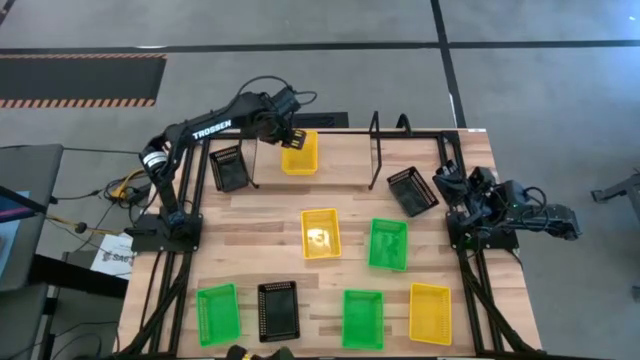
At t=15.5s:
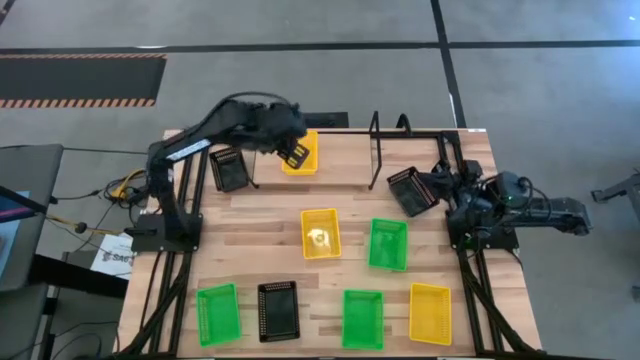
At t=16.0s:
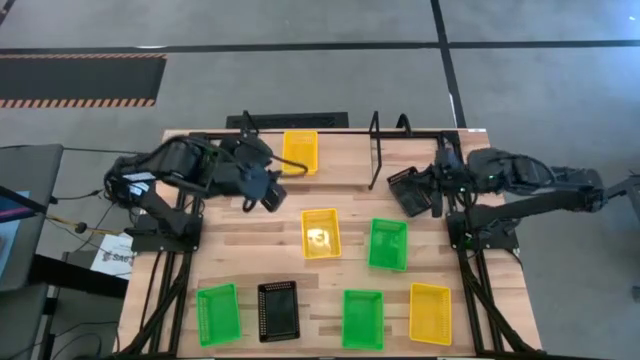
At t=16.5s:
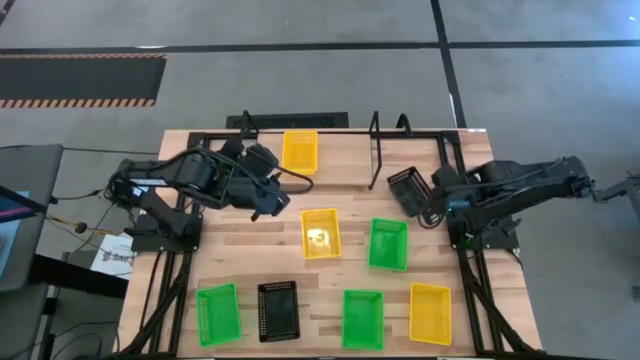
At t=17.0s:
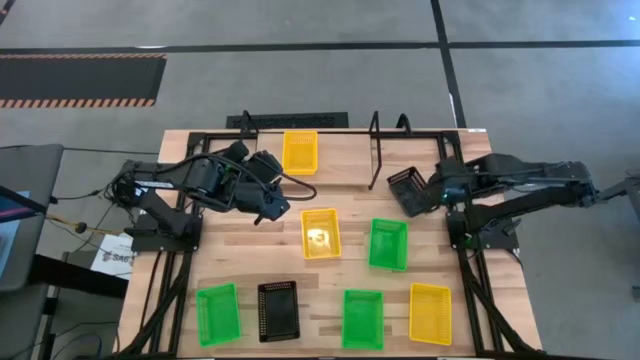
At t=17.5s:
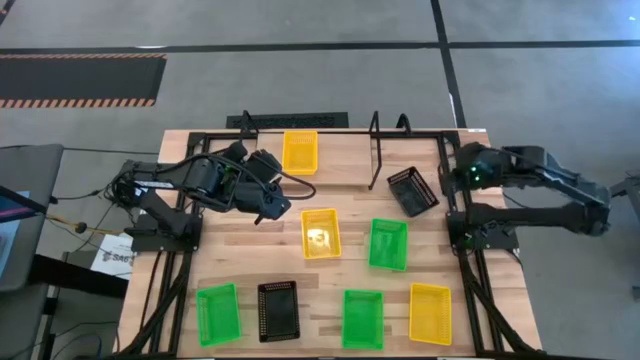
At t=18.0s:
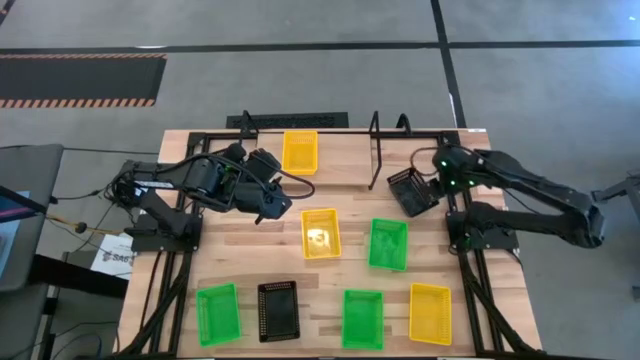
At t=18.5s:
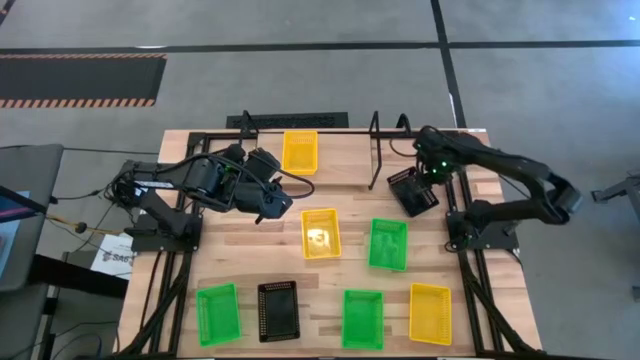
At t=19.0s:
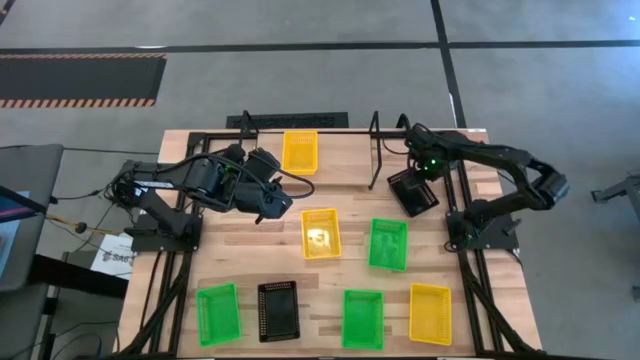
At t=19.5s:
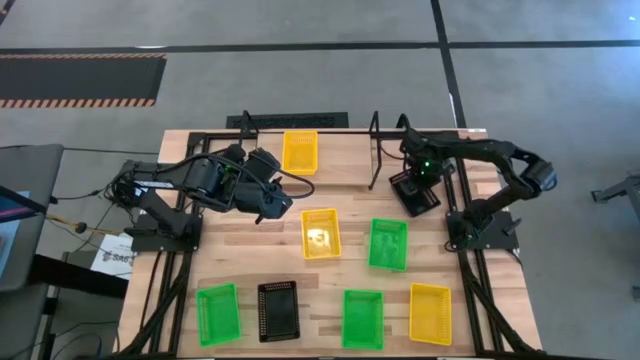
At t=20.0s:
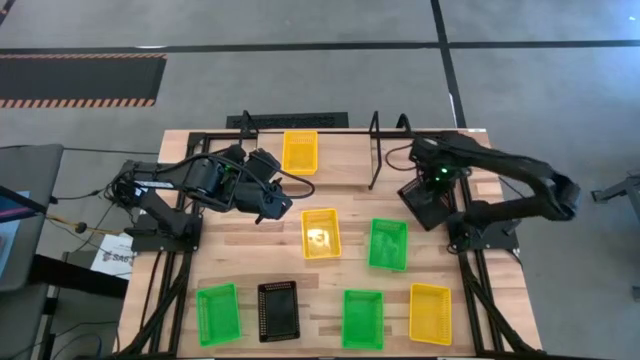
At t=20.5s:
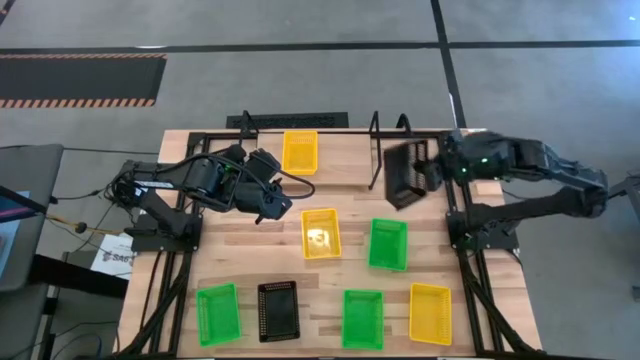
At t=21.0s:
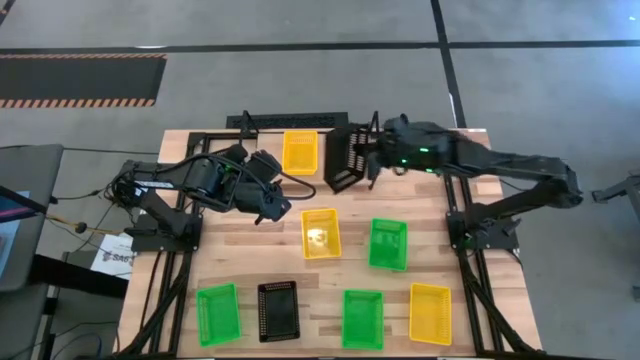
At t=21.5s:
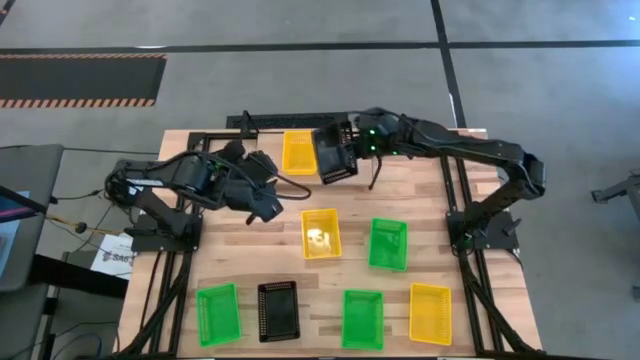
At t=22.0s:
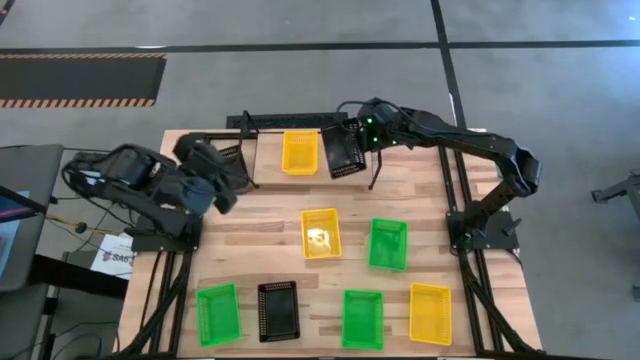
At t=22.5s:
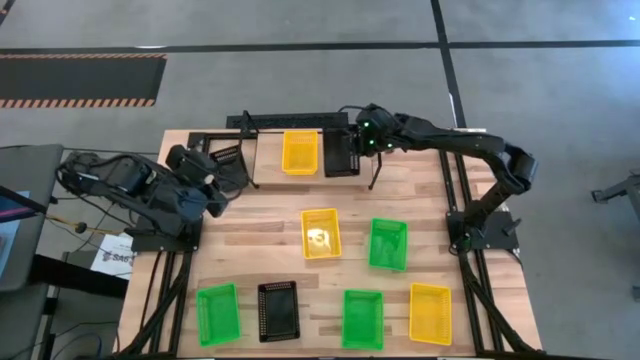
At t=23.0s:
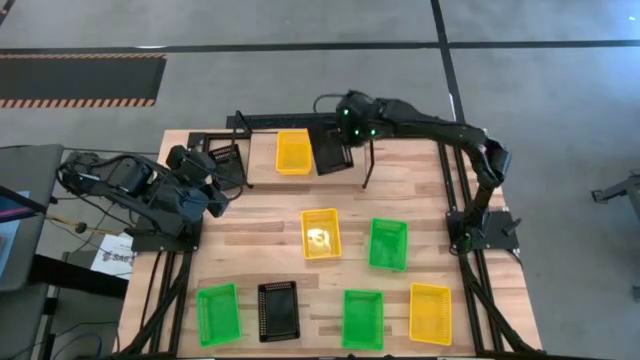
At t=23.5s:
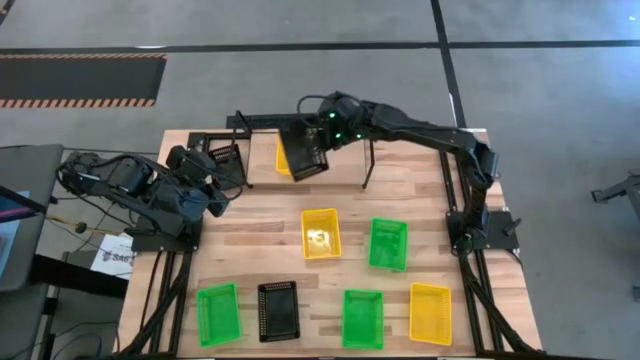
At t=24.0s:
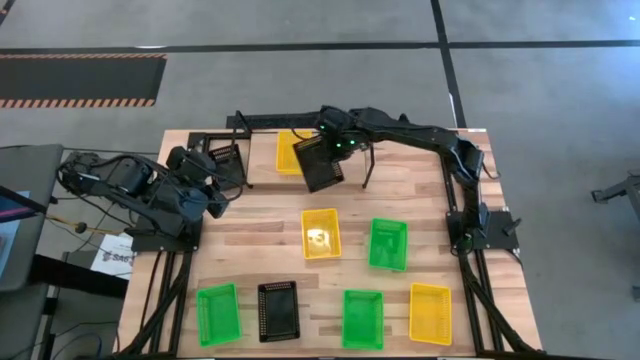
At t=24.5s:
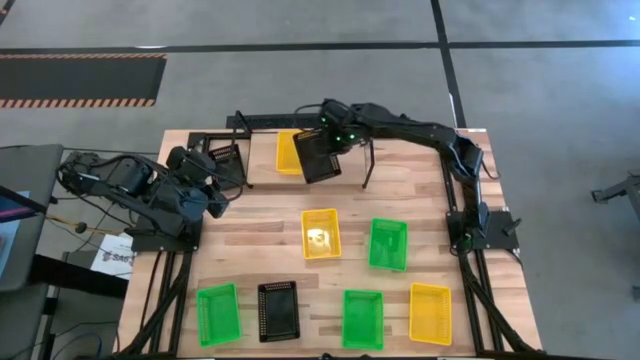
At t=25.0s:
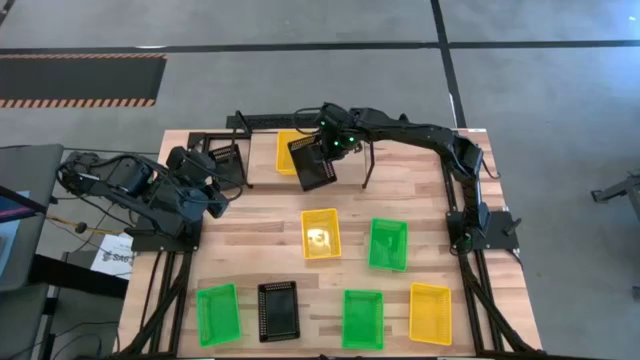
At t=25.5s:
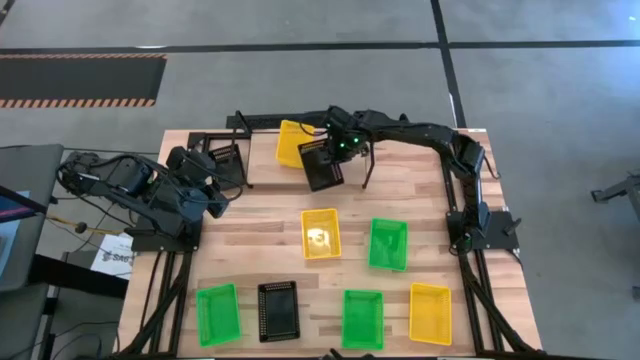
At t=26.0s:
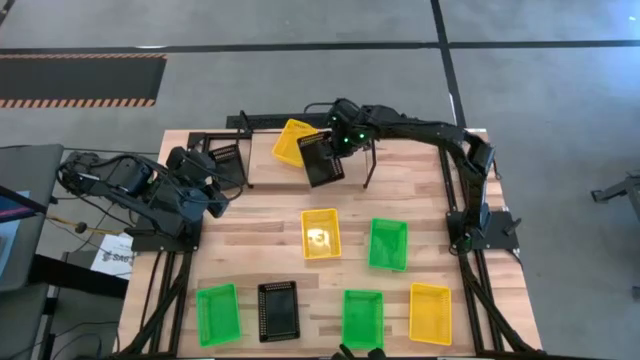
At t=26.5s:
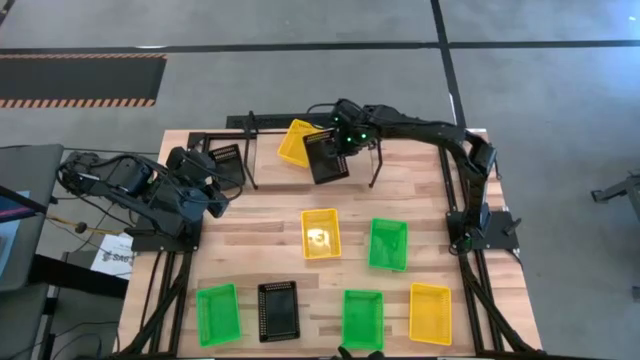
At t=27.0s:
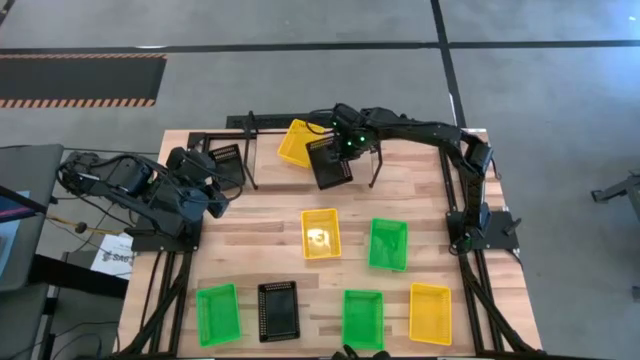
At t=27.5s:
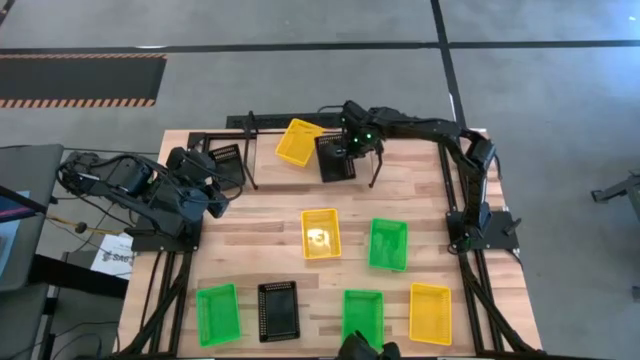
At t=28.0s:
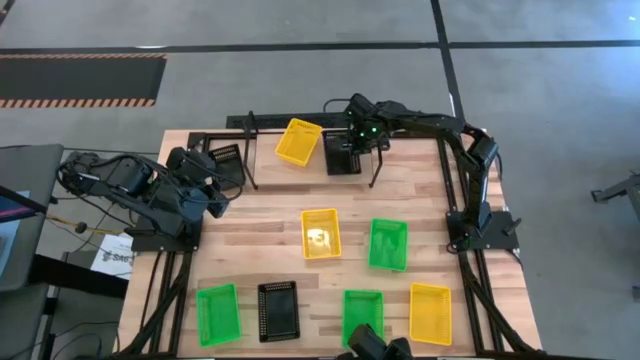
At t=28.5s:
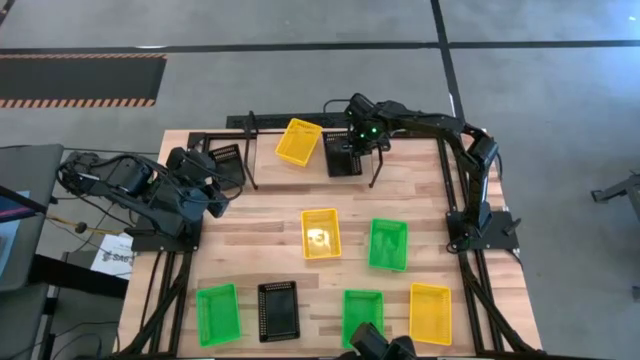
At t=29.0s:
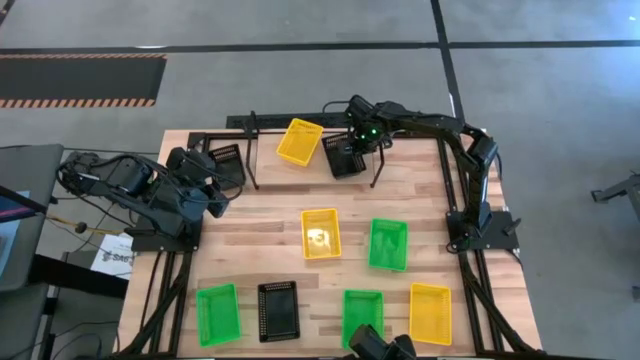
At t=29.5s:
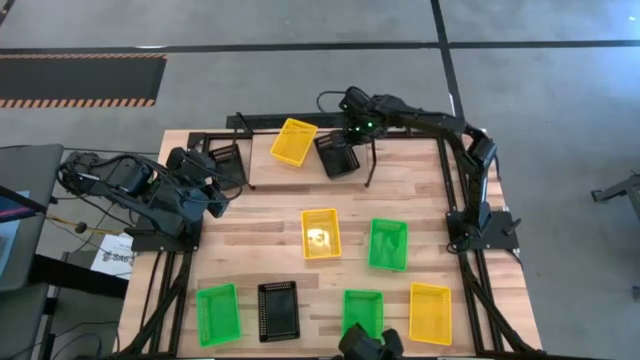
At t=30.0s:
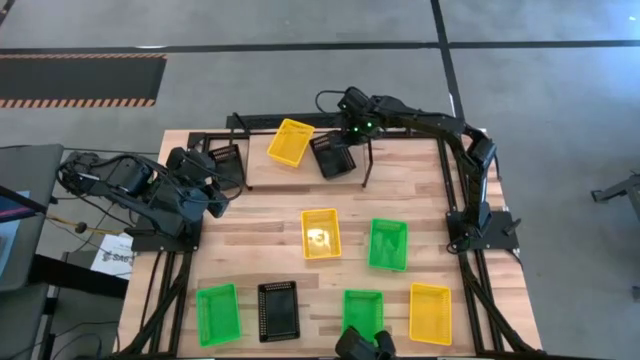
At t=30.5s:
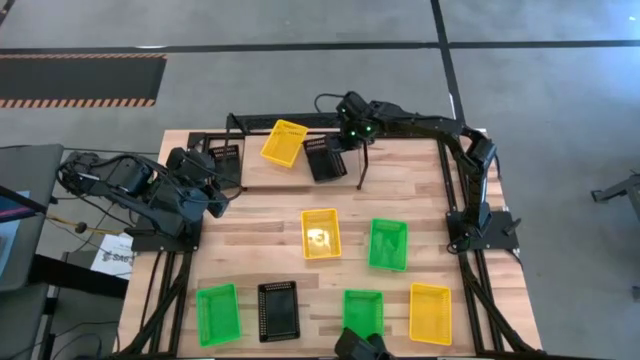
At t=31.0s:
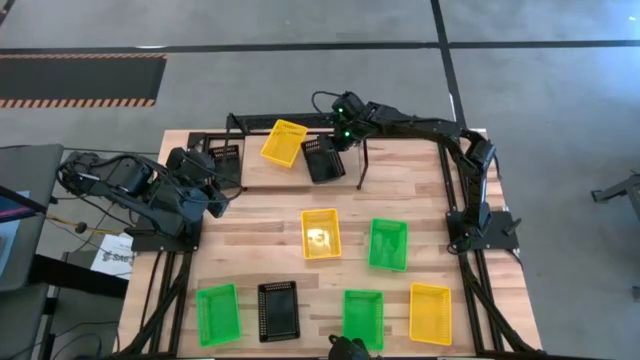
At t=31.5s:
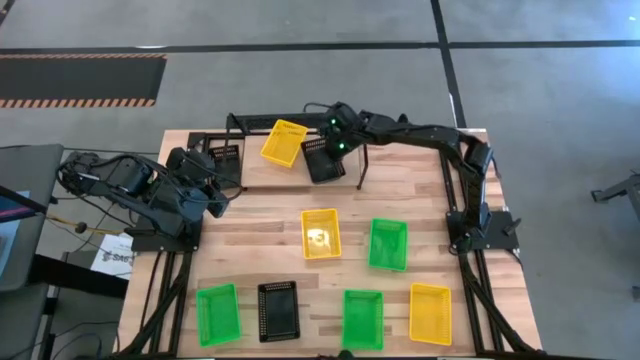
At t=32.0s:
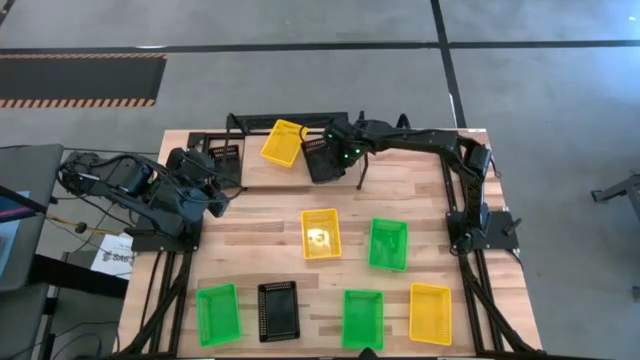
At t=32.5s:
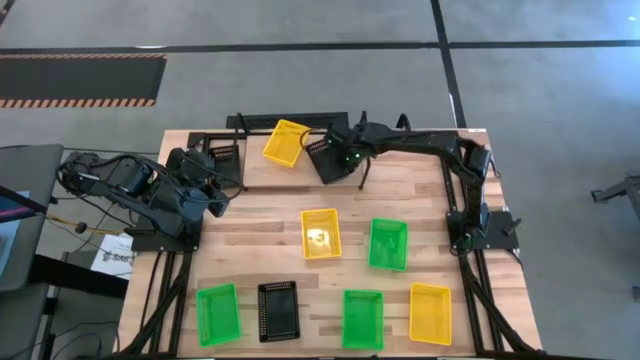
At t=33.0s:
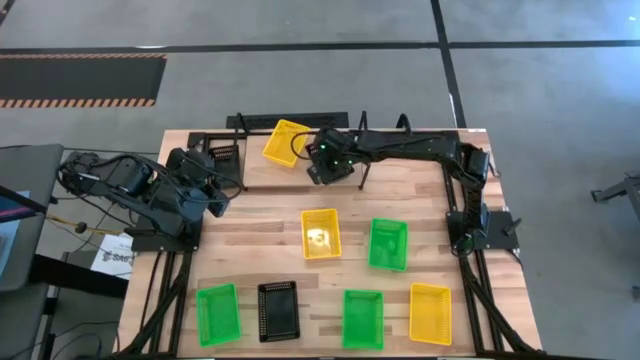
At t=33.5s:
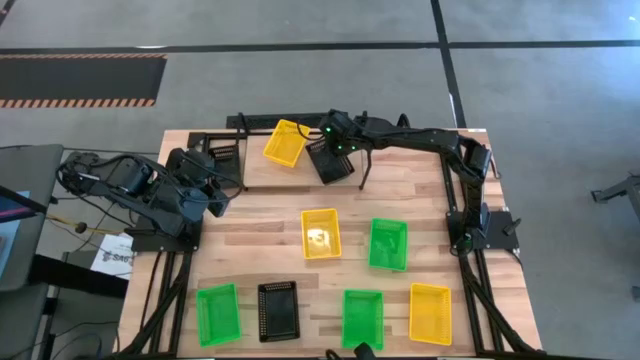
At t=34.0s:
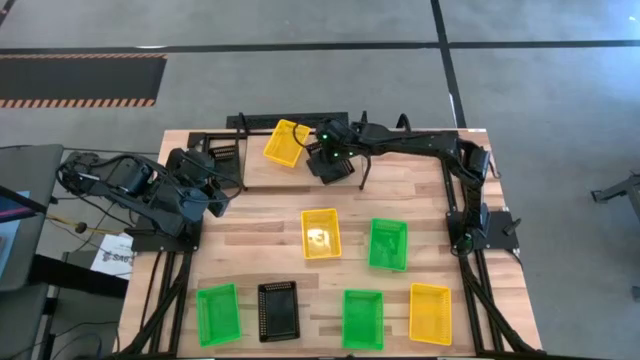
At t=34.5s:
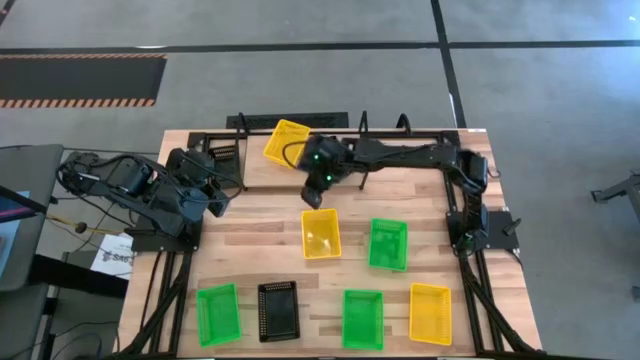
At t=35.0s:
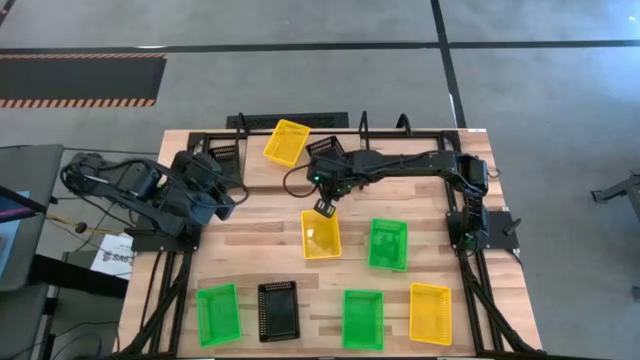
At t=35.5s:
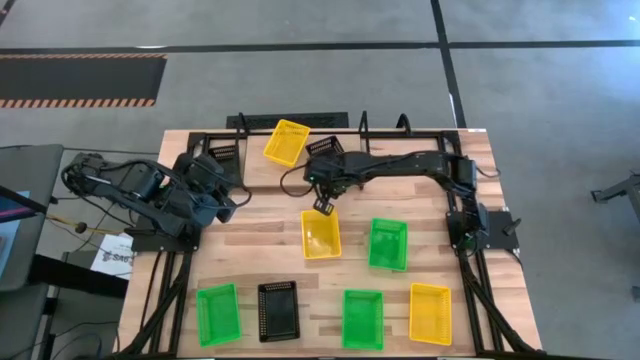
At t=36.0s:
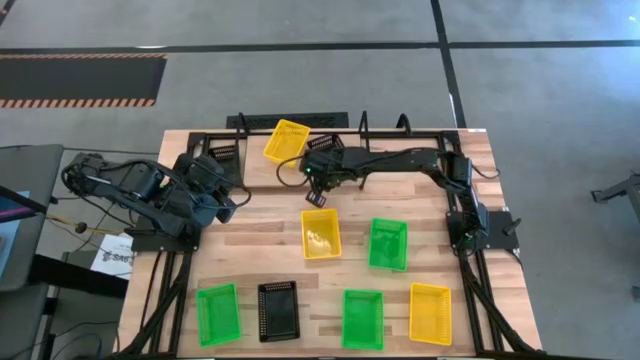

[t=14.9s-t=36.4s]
Task: Stack baskets on shelf by color
Put the top right black bin on the shelf
